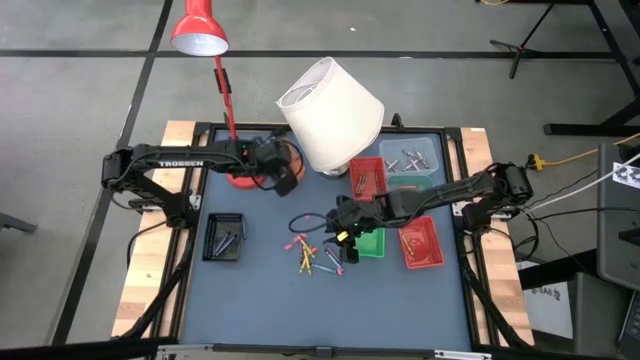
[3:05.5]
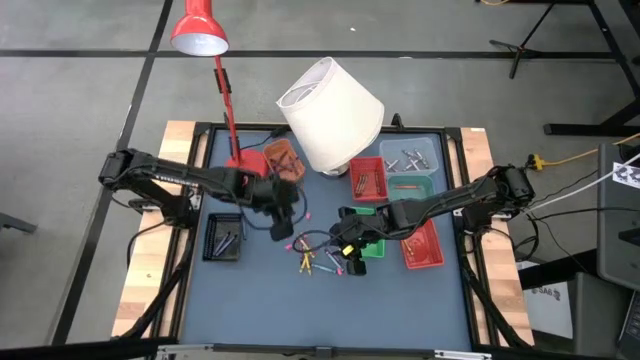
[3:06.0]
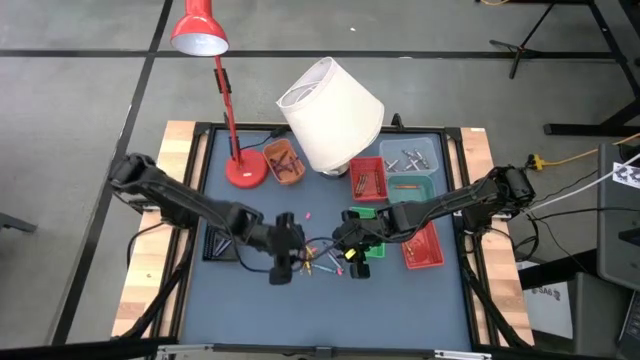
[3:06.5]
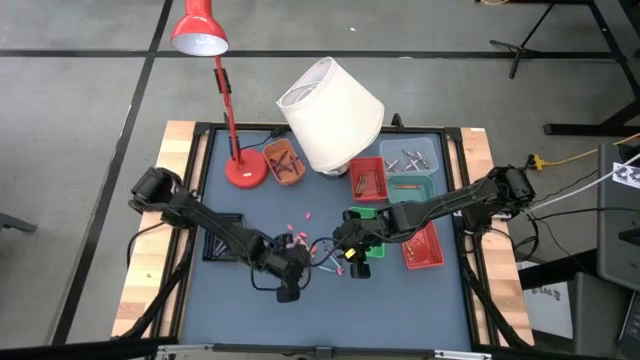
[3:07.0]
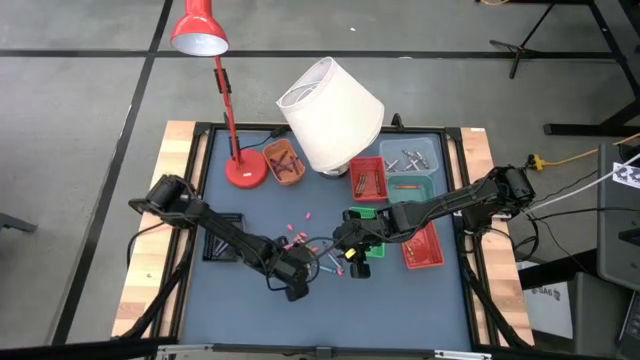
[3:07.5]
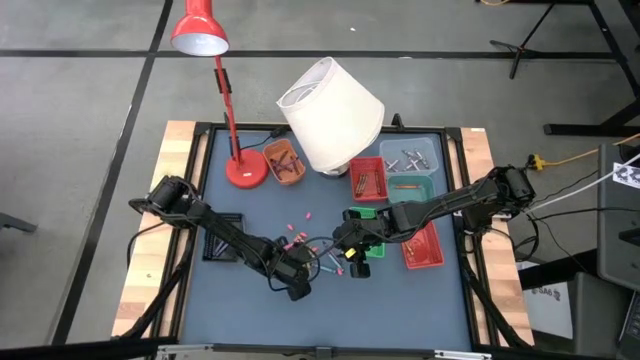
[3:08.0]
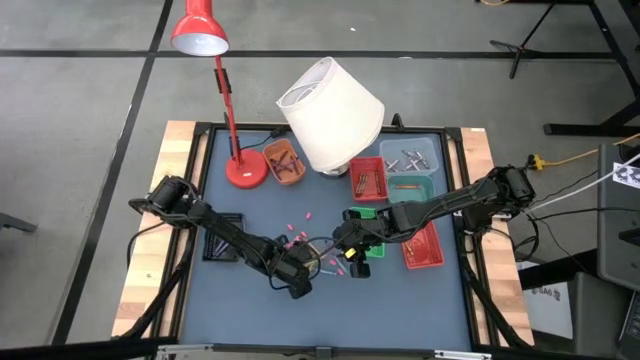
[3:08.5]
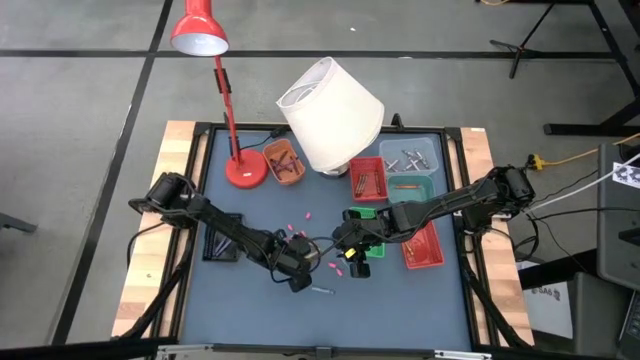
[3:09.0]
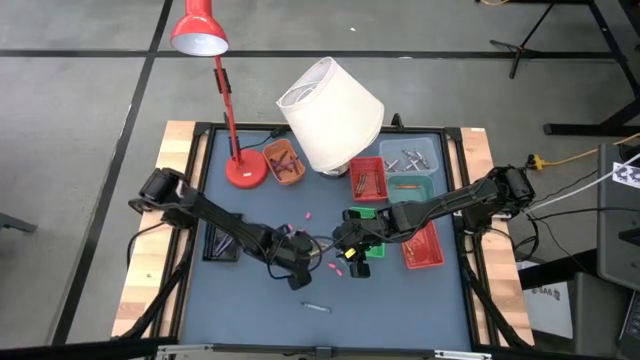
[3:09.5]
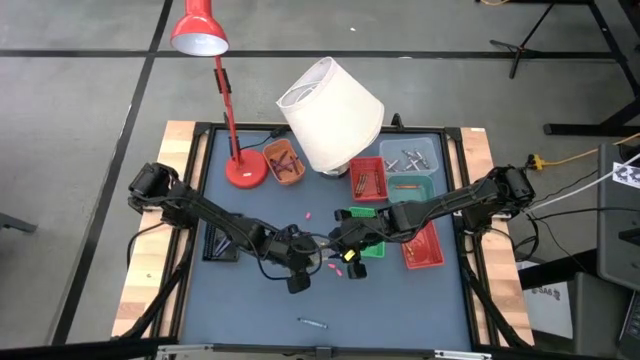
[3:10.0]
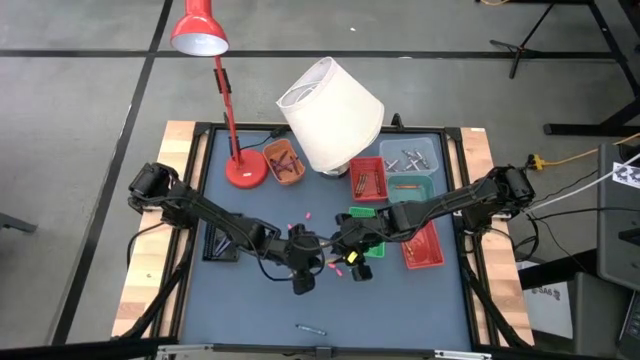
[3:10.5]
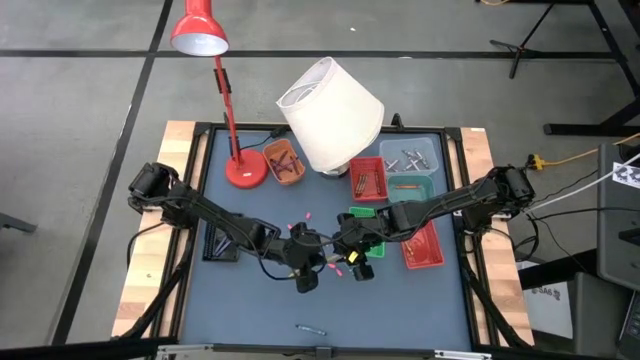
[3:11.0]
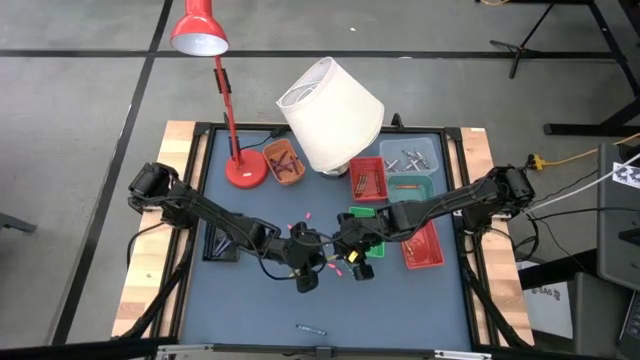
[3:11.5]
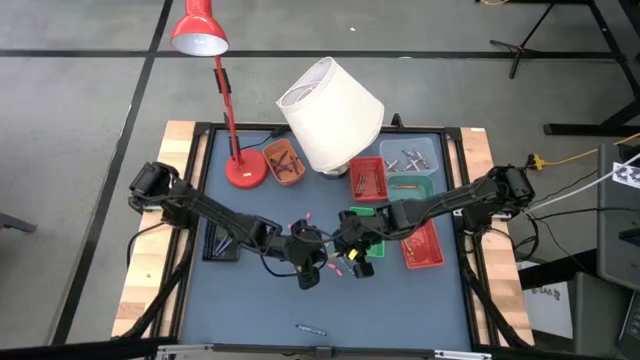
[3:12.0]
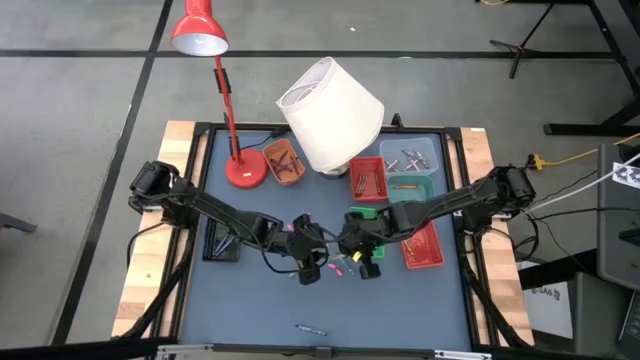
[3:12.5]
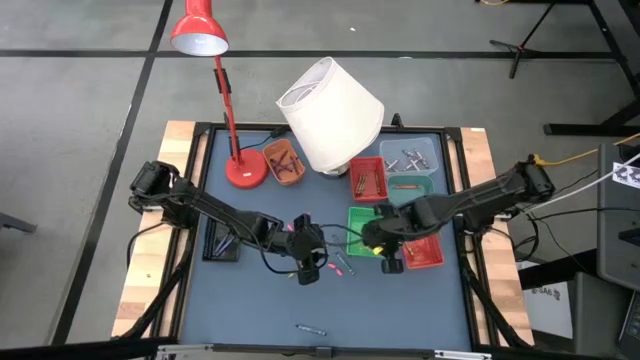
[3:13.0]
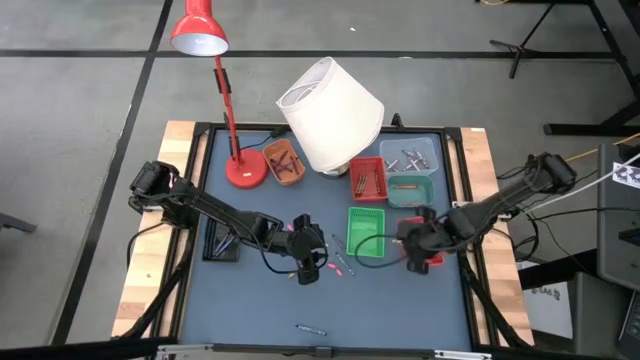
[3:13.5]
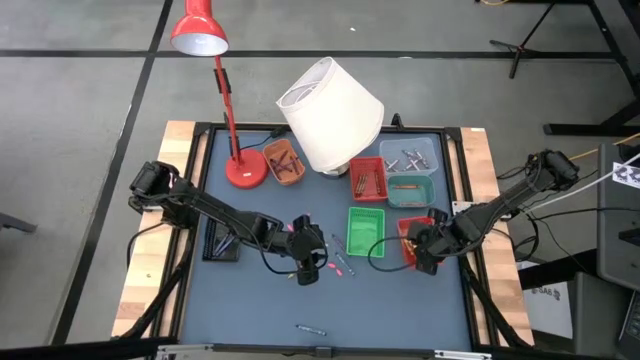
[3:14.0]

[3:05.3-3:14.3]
Task: Sort crayons
Put the yellow crayon into the bottom dark orange bin

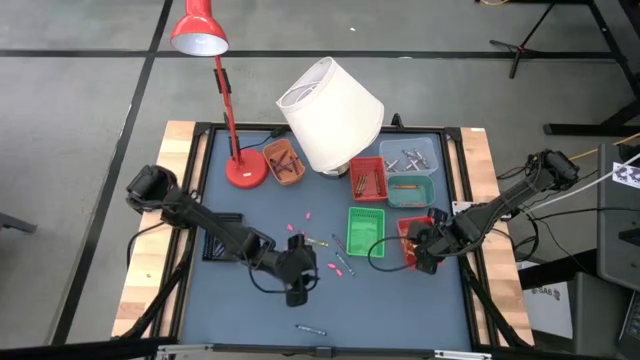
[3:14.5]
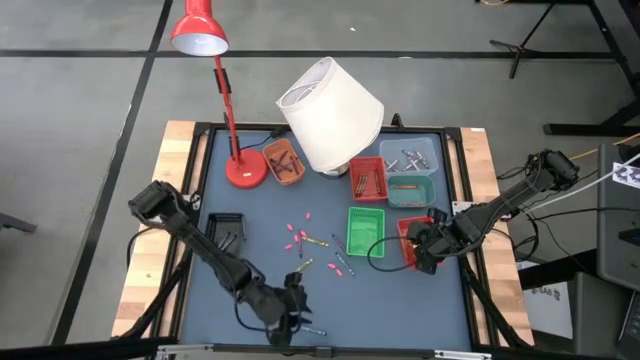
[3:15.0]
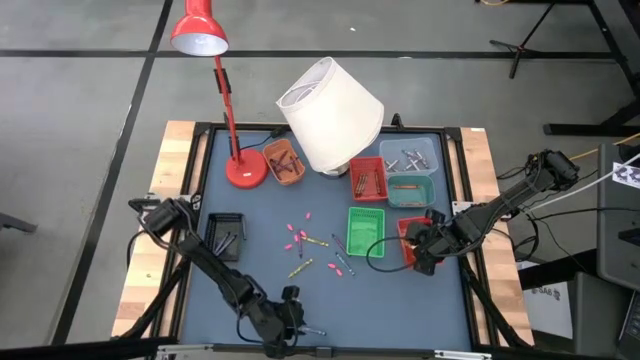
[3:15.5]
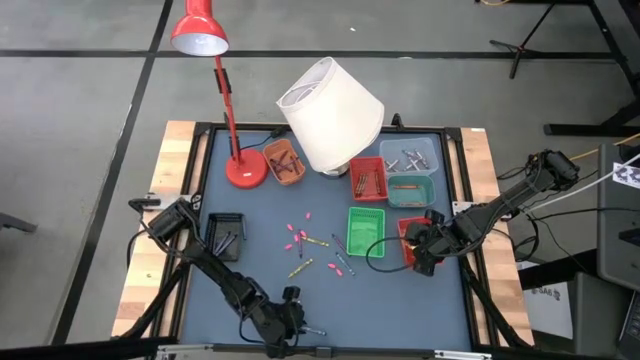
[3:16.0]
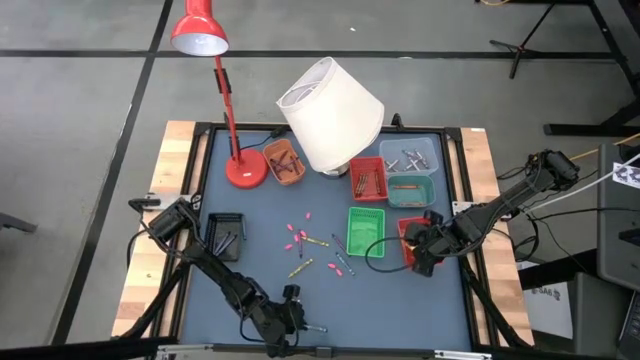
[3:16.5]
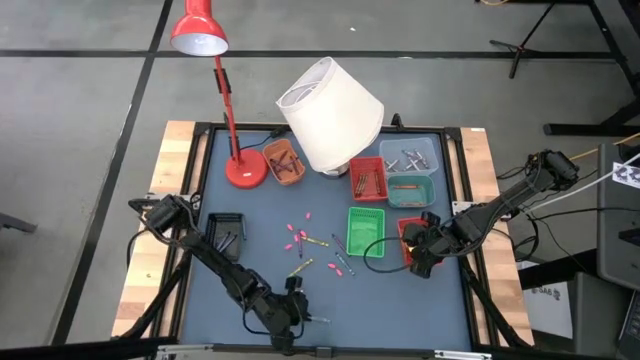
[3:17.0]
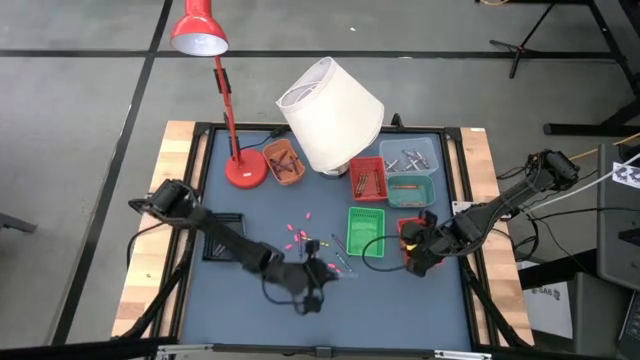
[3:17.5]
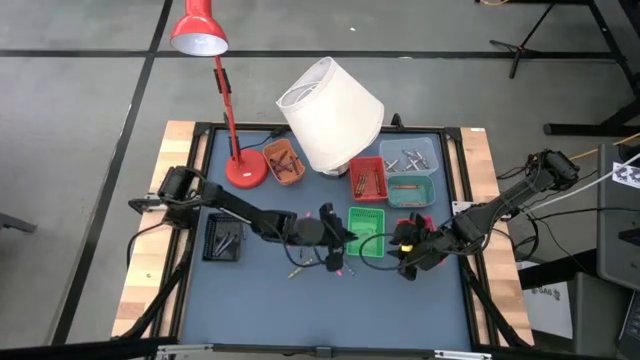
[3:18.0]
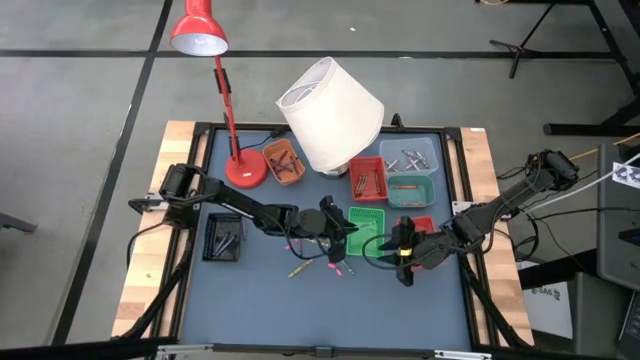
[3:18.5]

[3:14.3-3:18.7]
Put the light blue crayon into the green bin

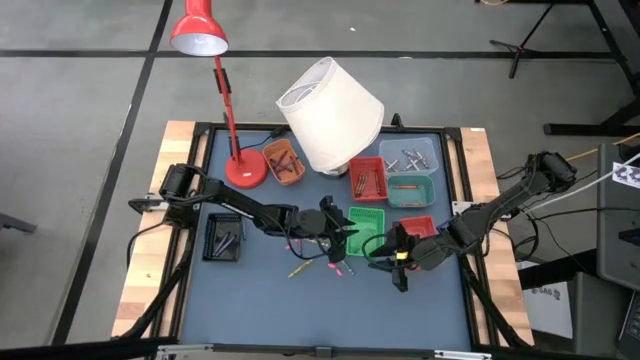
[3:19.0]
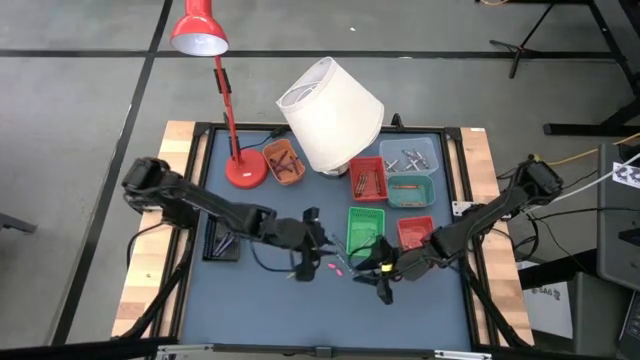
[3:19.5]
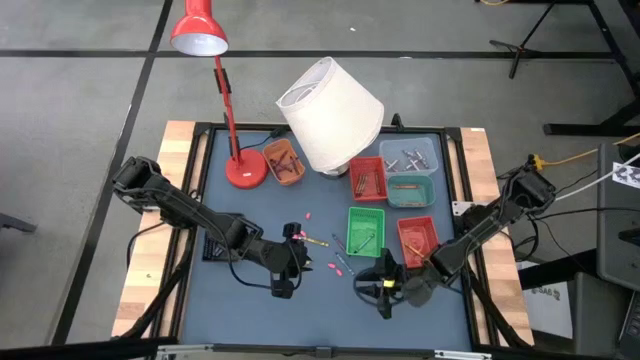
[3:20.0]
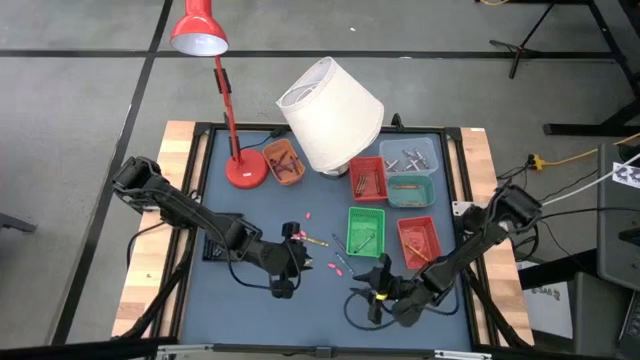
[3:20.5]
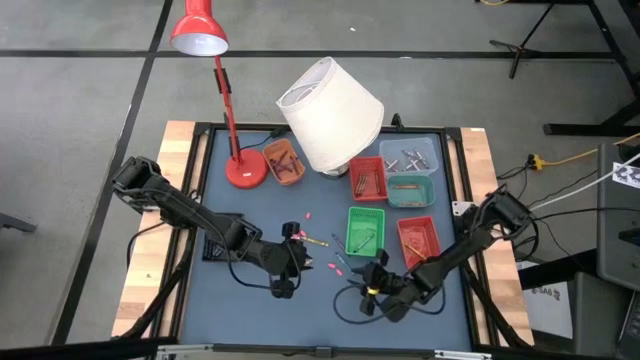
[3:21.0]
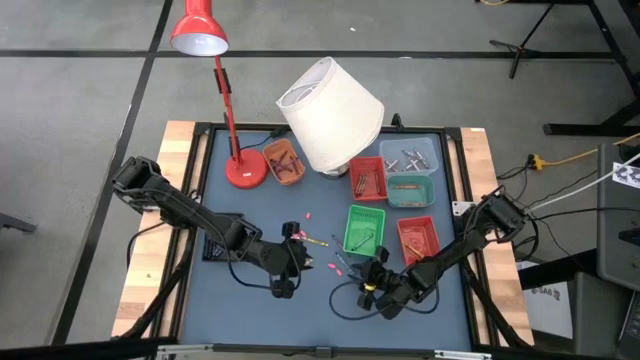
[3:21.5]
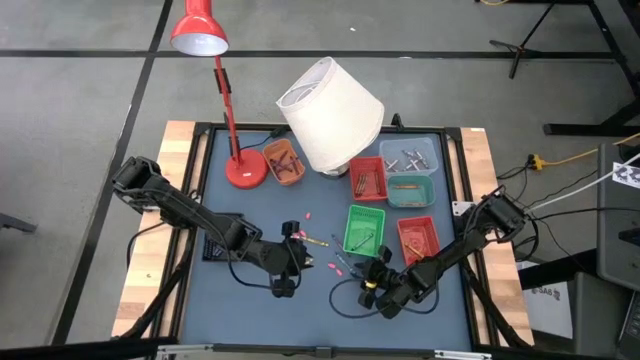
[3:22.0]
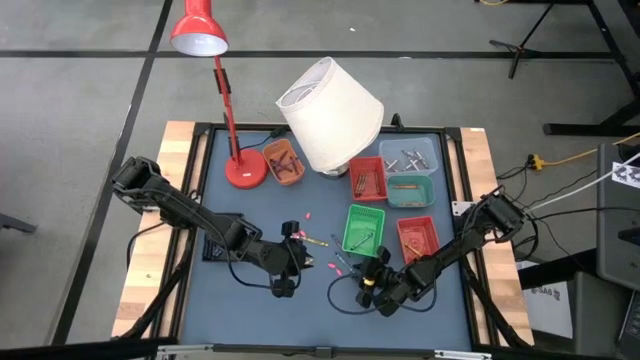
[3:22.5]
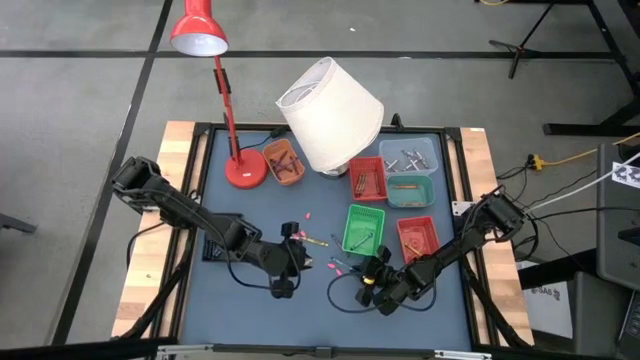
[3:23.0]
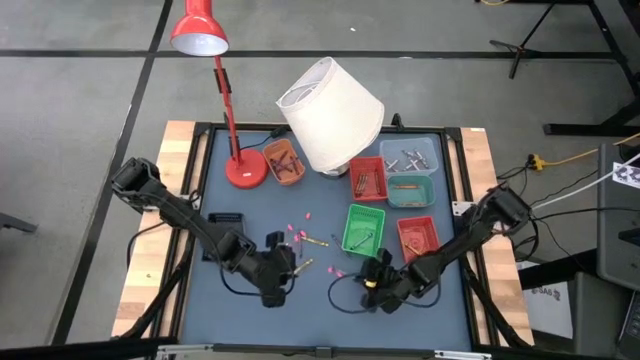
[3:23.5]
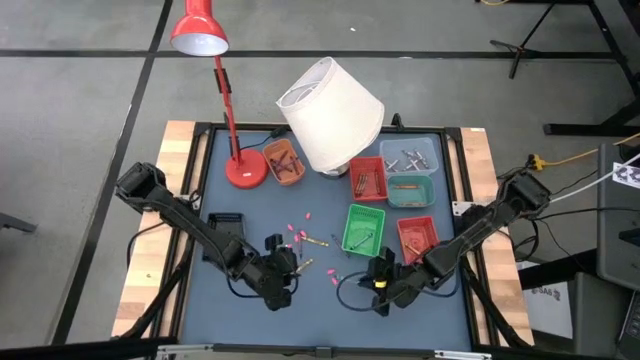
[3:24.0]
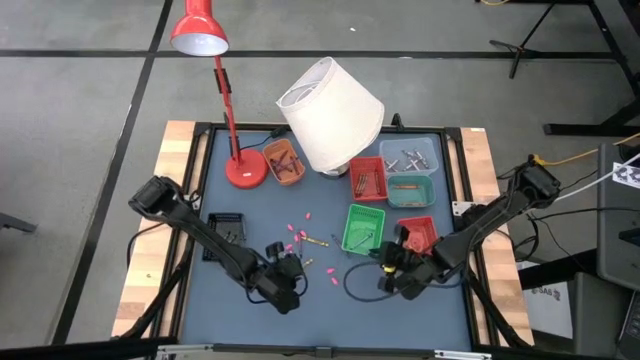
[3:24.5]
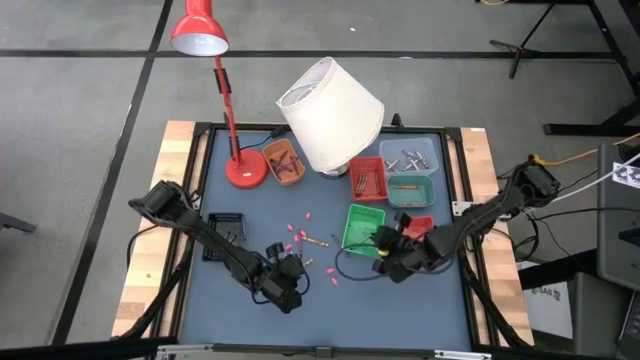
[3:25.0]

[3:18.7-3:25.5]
Put the light blue crayon into the green bin

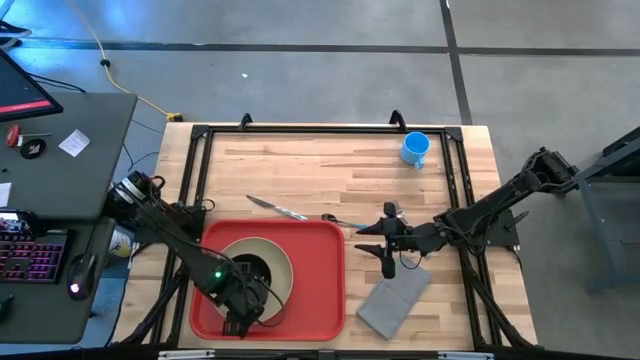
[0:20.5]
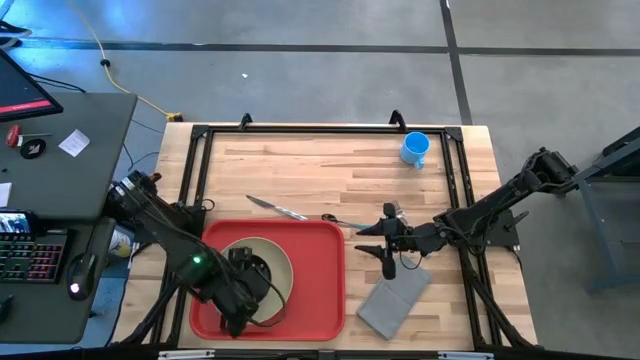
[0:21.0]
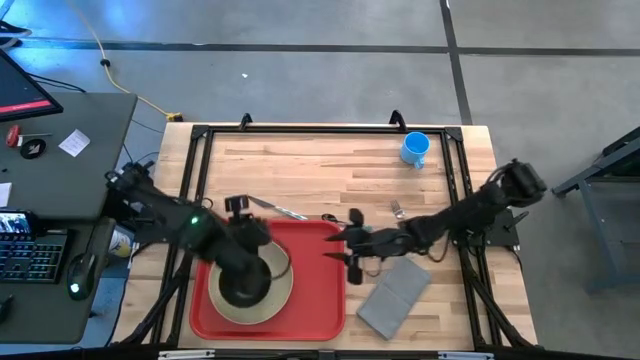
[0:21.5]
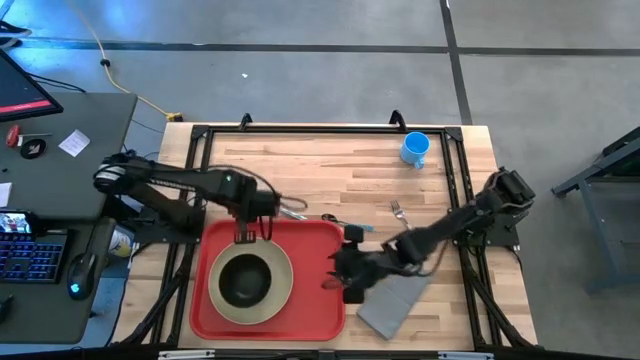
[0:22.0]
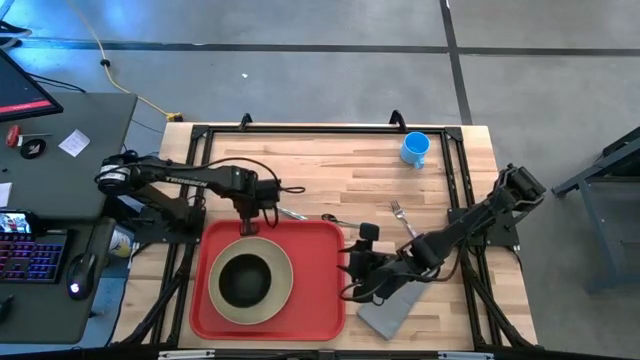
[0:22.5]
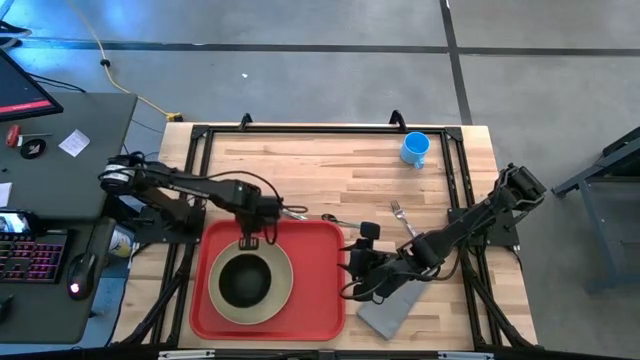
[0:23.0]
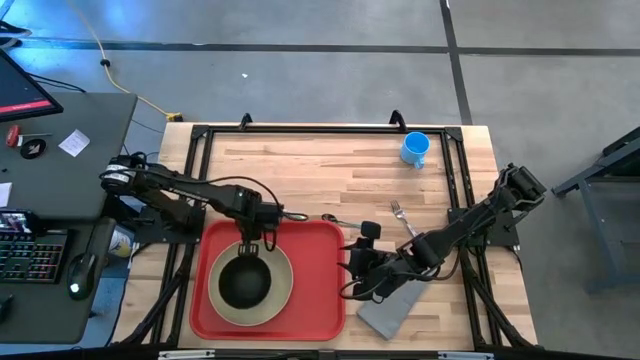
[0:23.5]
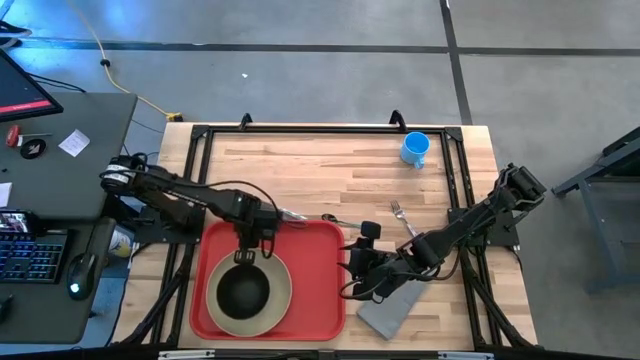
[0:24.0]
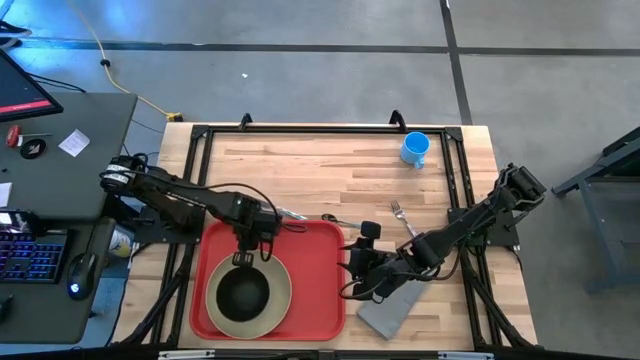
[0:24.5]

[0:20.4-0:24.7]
Task: Set up tray
Adjust the light brown plate on the red serving tray
